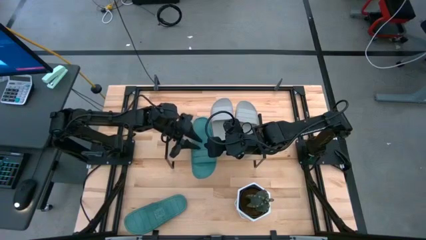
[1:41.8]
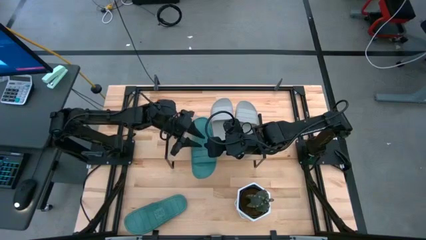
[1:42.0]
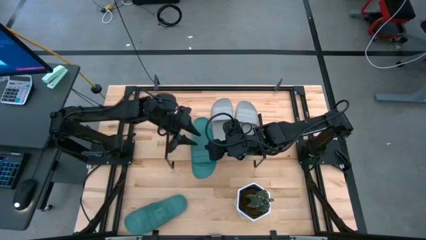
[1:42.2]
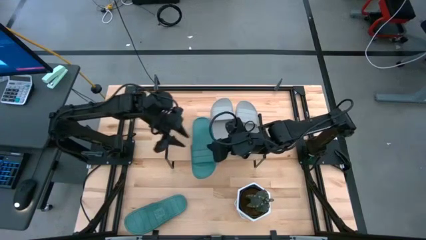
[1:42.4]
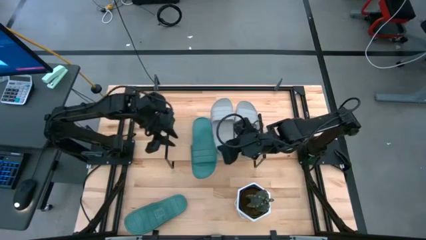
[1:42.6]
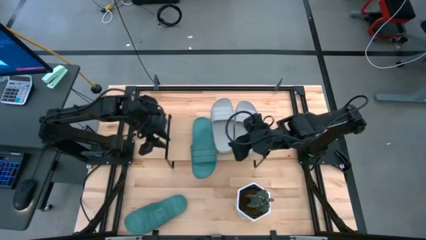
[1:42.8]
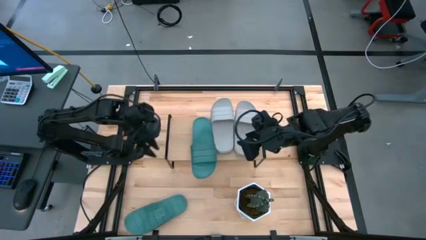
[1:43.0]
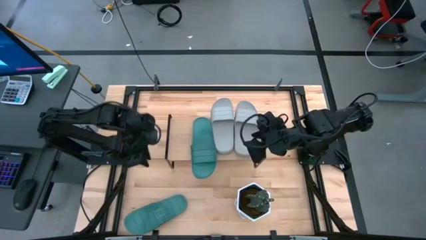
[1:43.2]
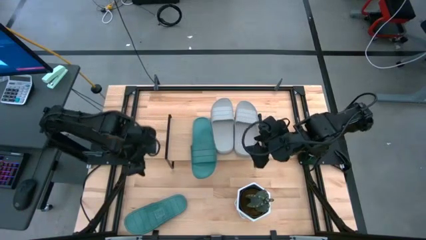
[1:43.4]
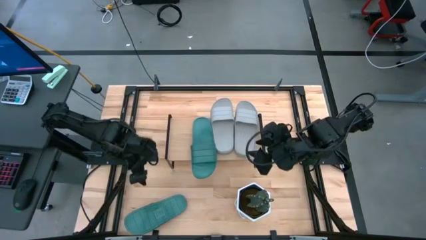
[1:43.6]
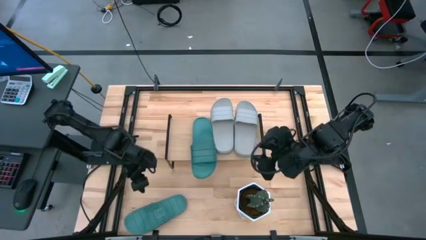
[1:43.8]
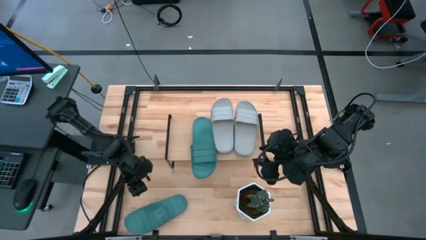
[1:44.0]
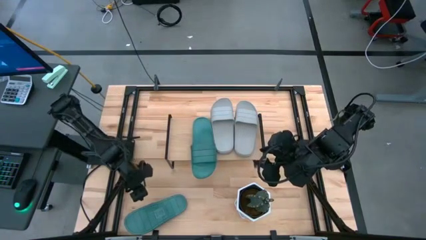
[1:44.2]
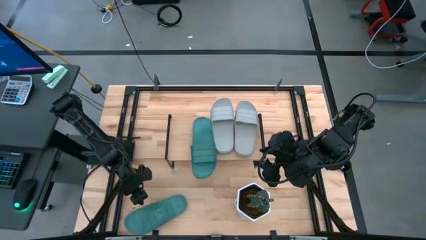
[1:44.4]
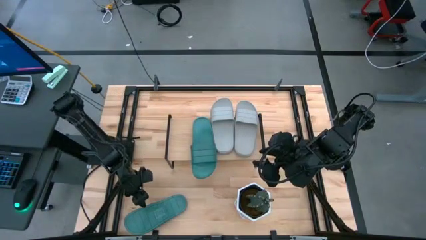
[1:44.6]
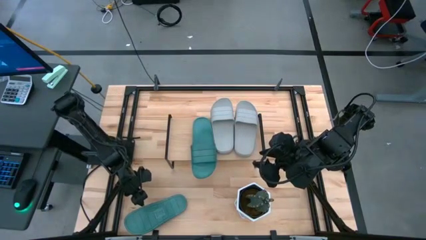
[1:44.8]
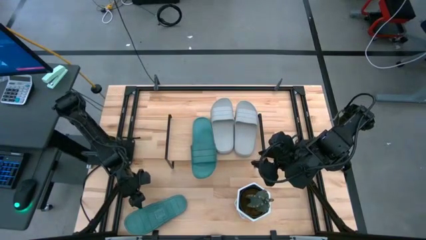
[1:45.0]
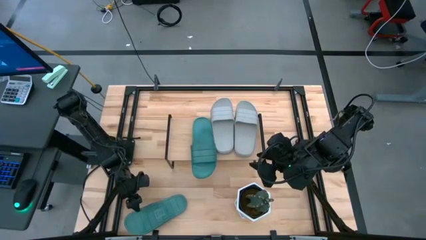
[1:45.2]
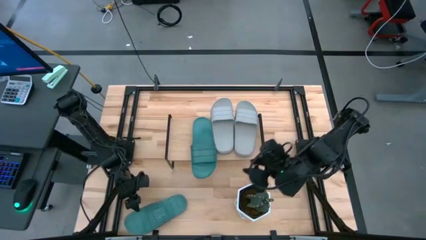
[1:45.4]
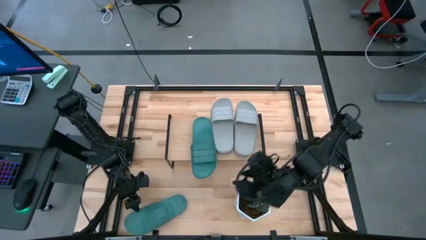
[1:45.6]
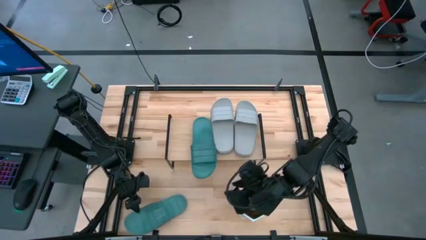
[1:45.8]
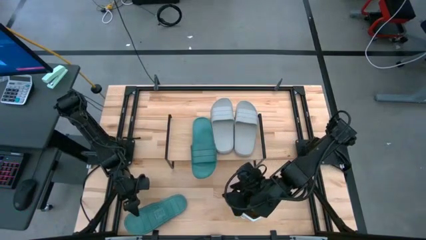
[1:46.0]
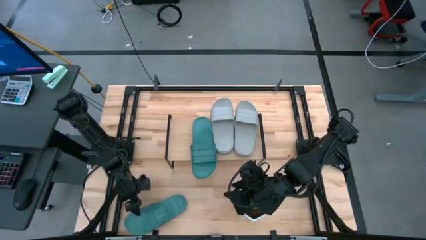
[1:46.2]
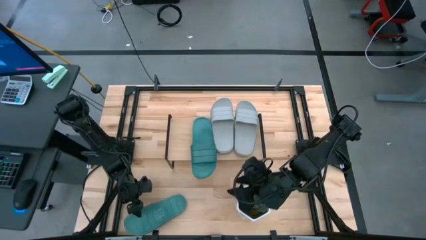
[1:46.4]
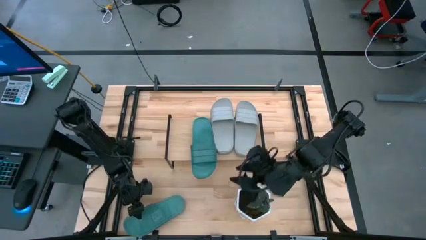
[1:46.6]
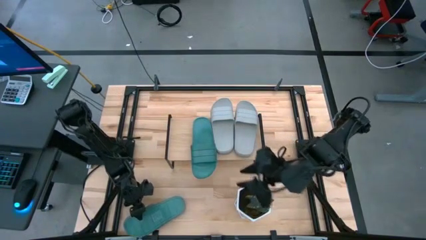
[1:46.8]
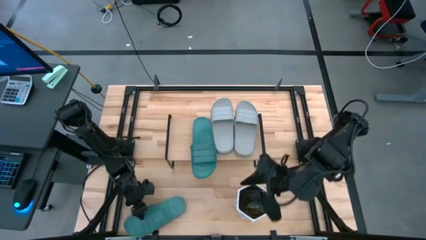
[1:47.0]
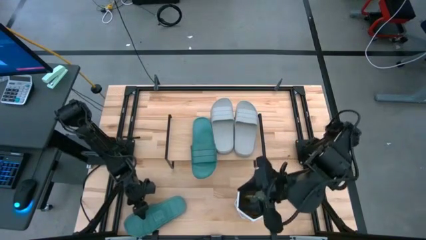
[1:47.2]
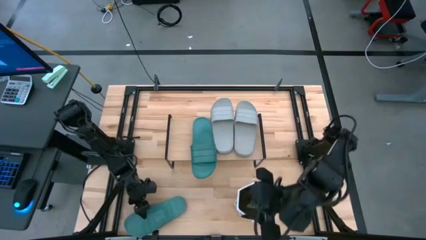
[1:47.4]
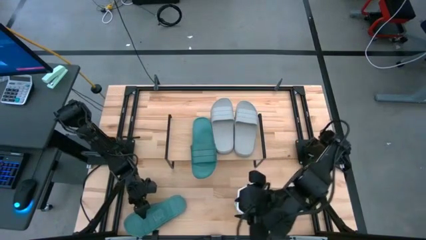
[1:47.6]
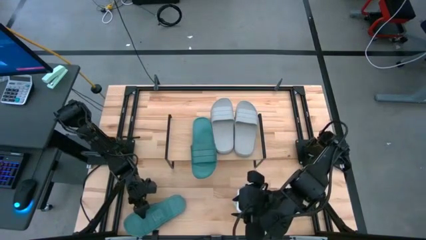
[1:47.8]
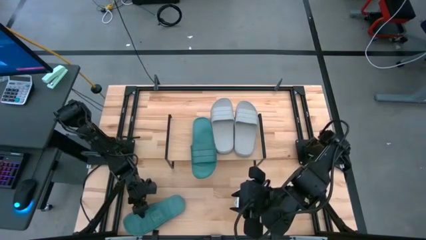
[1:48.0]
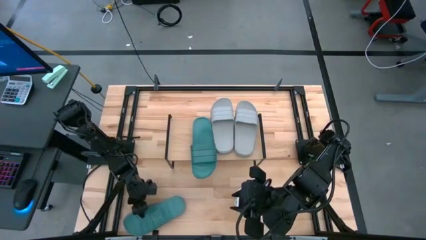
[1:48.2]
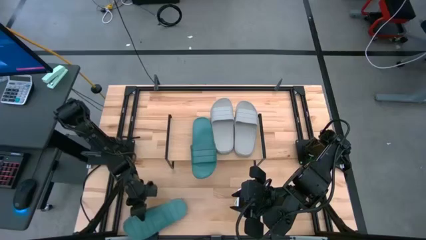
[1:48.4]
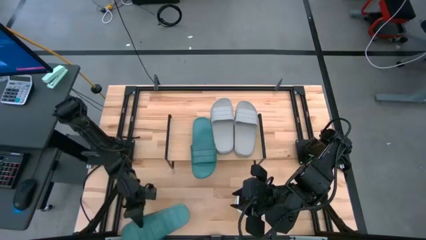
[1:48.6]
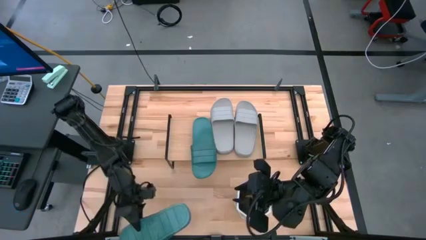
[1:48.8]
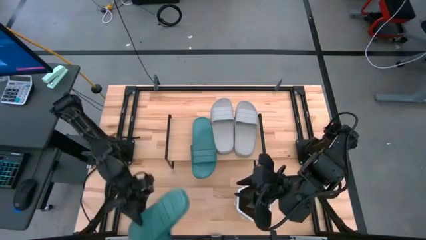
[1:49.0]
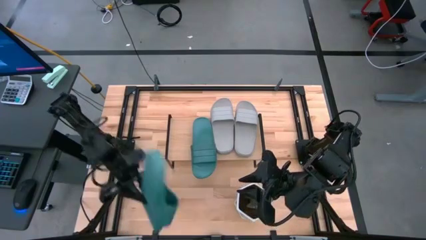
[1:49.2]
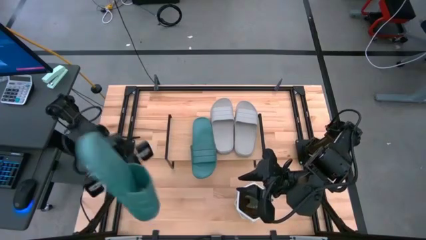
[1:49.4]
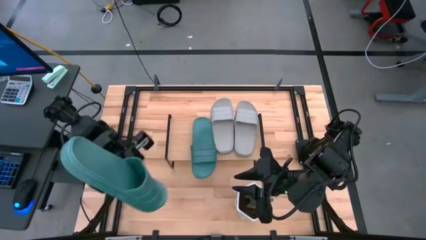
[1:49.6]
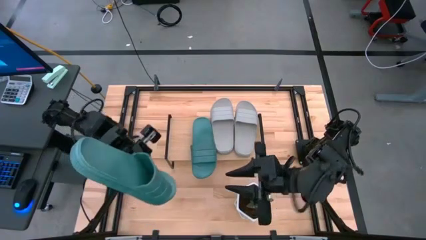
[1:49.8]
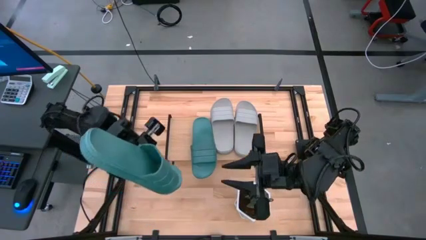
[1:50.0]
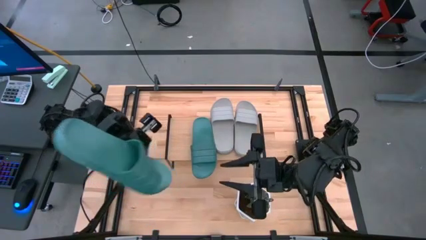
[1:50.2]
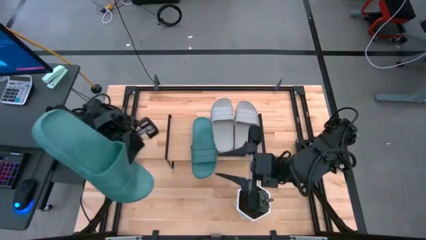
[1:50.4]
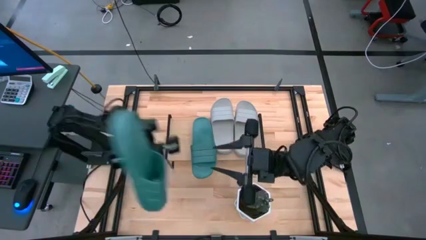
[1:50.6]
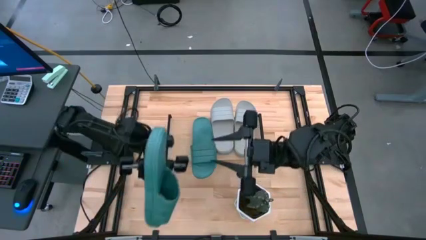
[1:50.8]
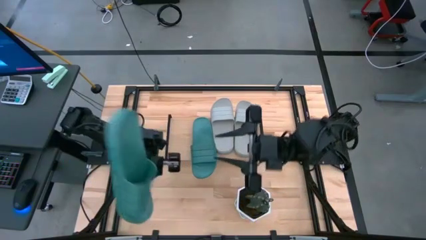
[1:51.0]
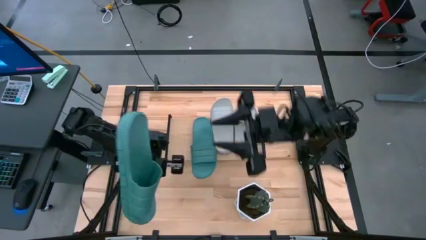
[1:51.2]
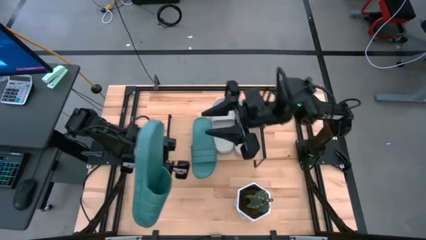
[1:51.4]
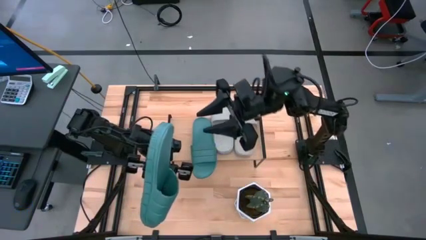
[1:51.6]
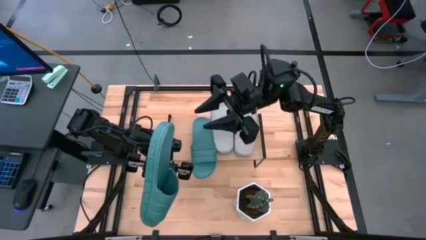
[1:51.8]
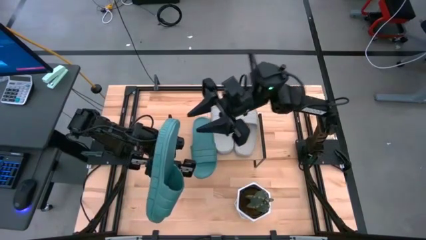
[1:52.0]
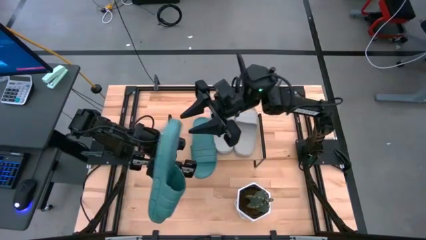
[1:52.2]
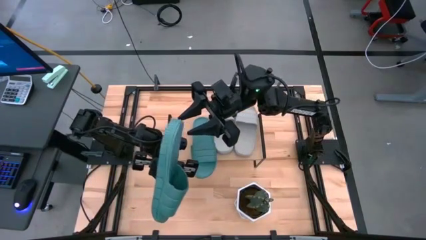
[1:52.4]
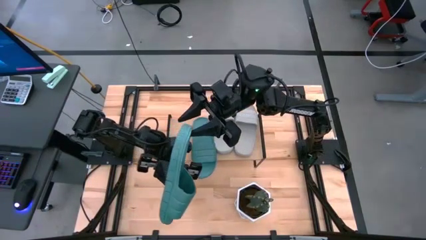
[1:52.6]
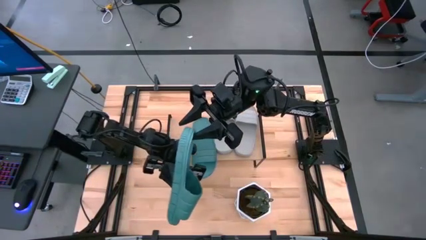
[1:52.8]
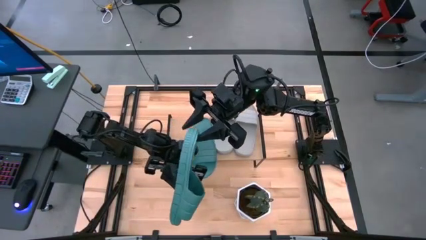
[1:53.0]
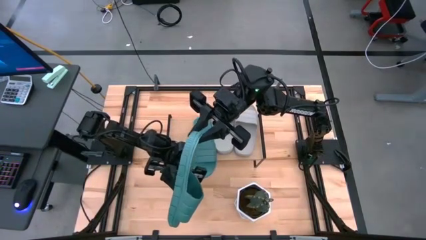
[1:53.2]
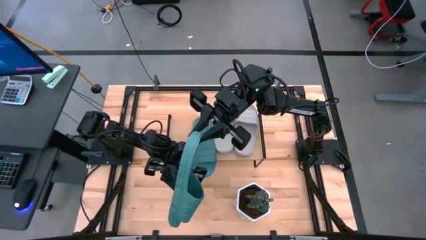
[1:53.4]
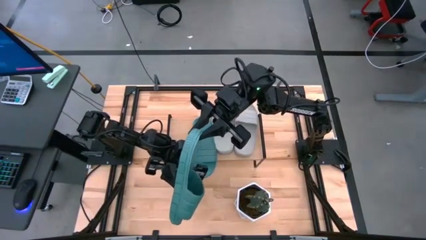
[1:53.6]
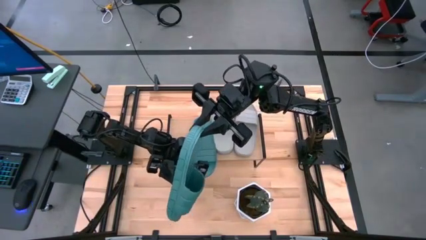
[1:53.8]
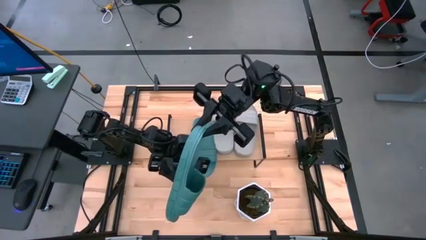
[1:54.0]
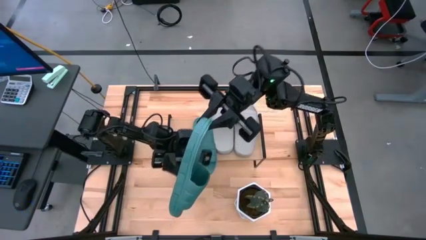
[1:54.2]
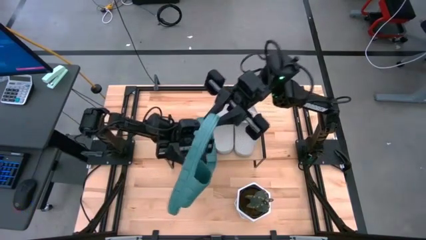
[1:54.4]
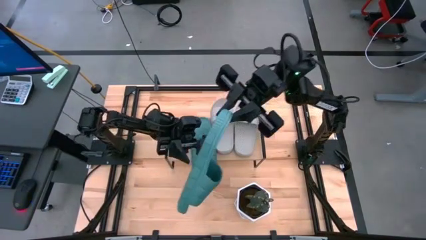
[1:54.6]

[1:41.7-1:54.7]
Task: Pick and place slides into the shelf
Put the green slide on the shelf

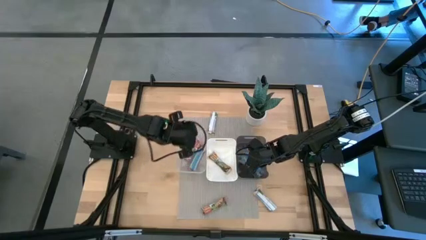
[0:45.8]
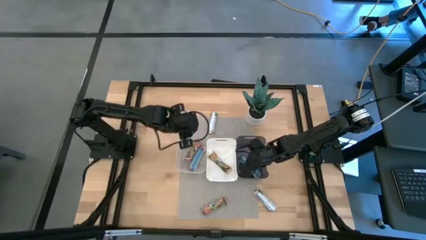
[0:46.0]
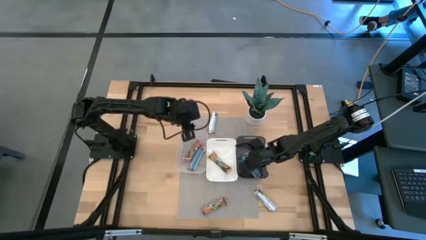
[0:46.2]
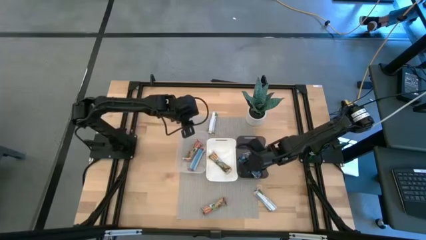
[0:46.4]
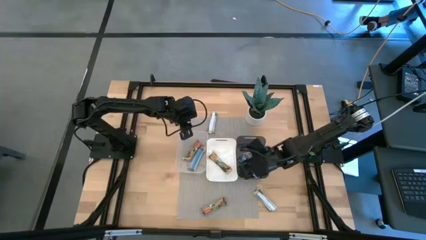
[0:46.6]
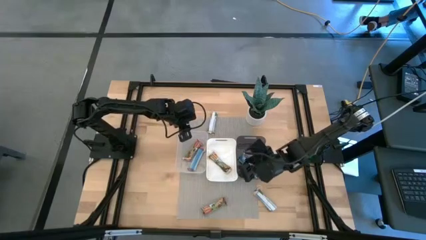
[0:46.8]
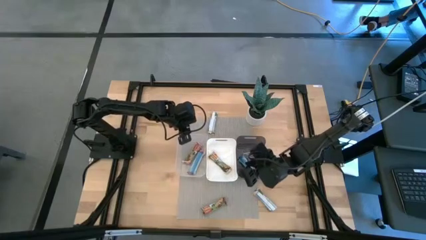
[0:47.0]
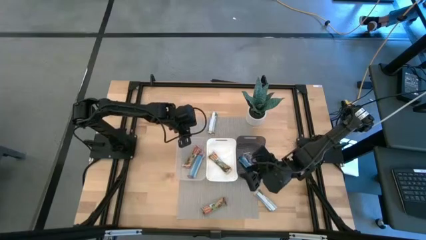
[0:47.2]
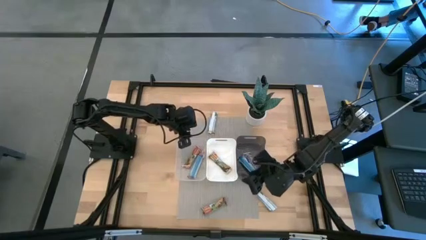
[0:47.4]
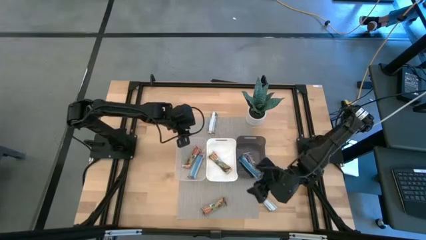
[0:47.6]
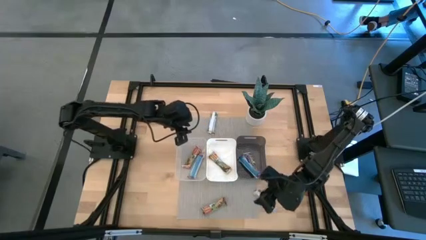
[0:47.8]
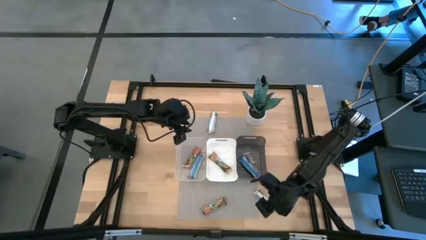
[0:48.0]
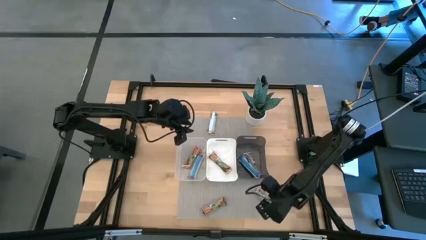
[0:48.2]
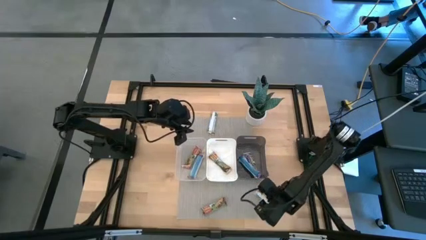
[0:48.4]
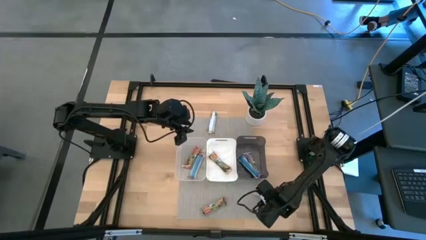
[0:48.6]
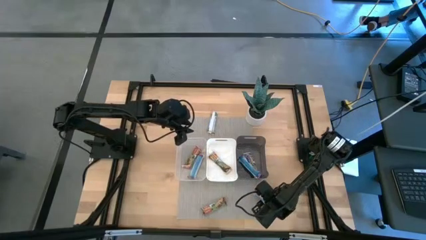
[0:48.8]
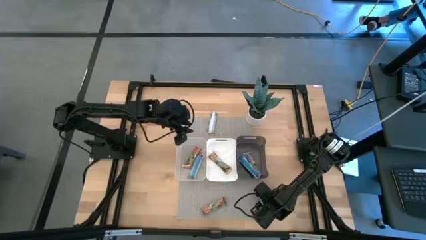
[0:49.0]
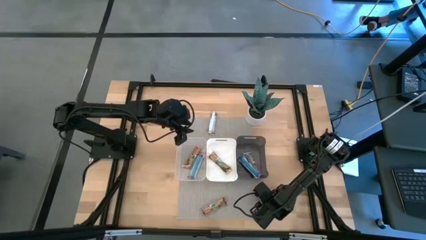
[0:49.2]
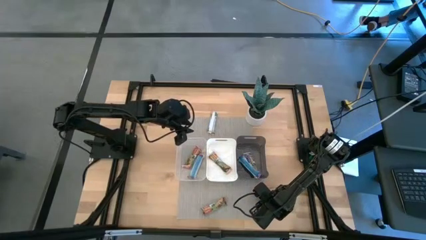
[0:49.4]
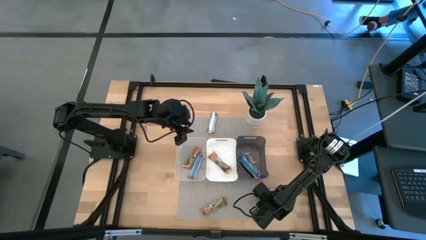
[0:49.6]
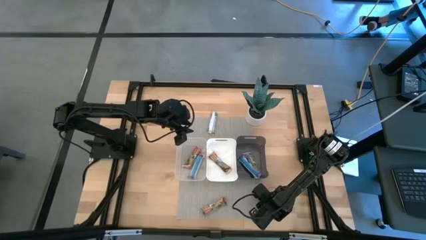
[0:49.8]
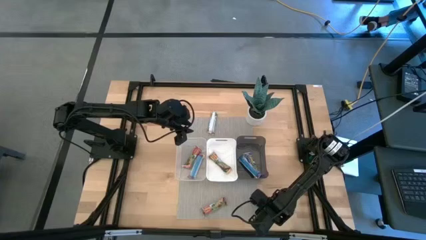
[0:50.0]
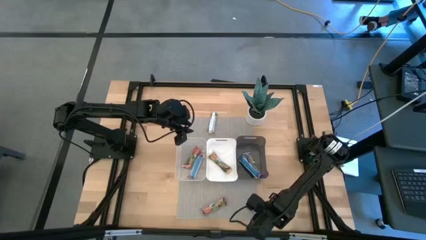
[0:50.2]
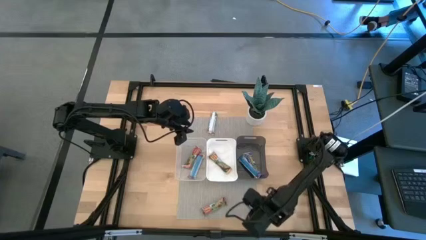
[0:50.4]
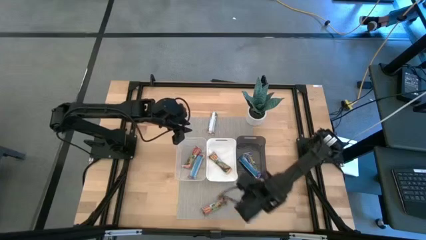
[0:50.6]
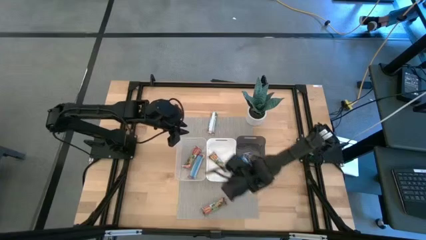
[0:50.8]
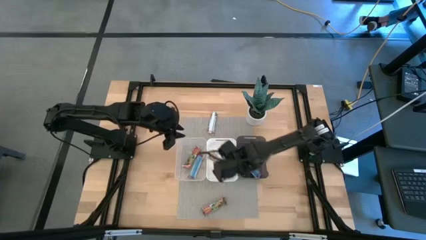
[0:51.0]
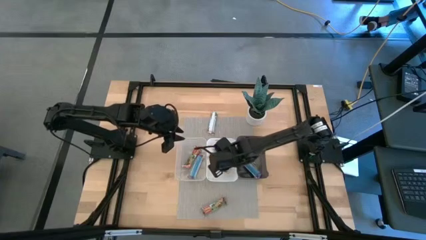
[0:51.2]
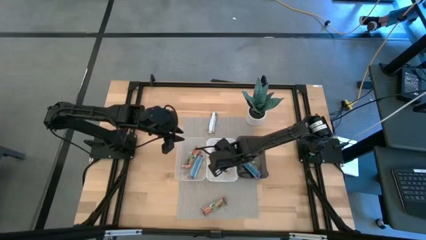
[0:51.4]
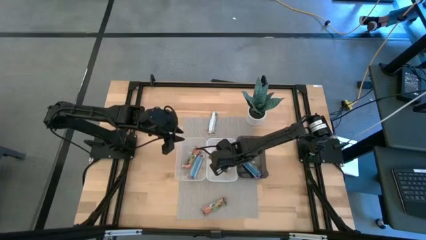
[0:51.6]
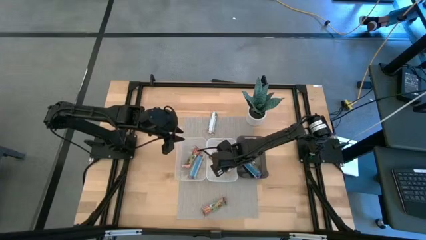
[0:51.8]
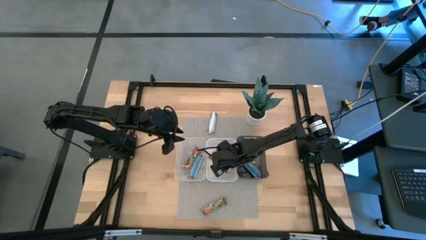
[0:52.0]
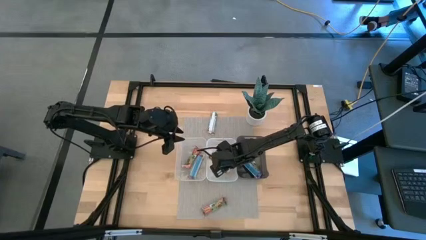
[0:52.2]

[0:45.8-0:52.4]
Task: Pick and place Granola Bars by type
Put the bottom yellow granola bar into the white bin
